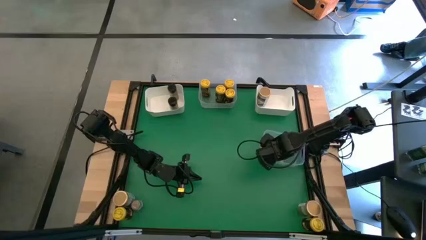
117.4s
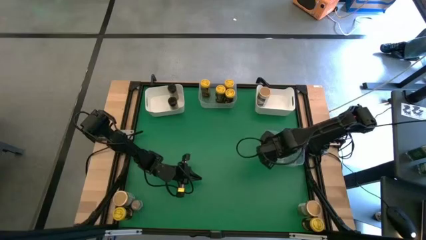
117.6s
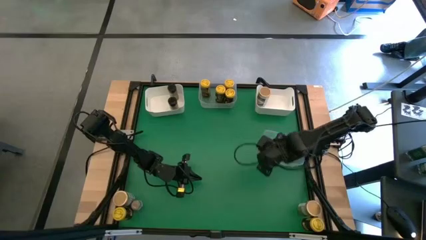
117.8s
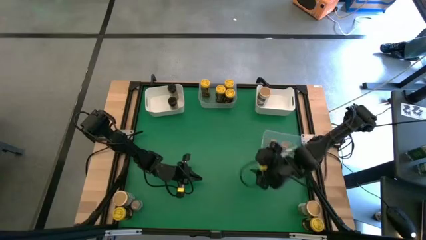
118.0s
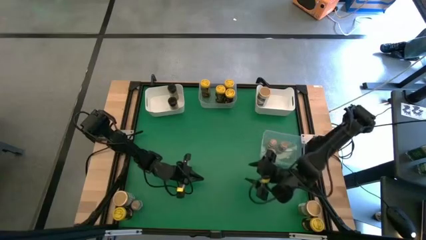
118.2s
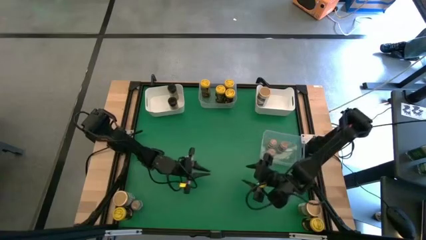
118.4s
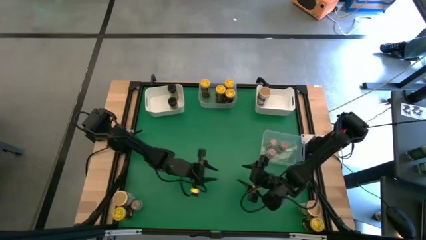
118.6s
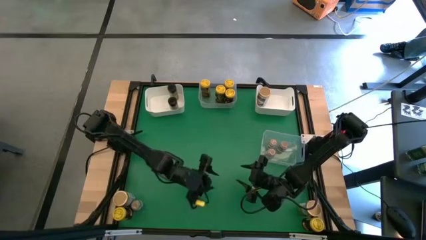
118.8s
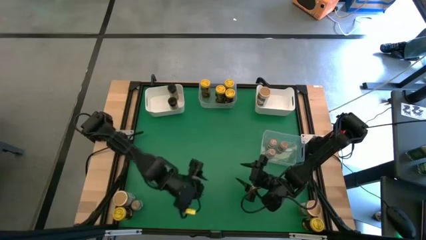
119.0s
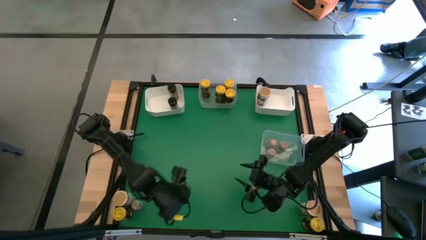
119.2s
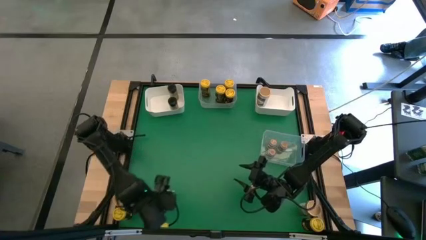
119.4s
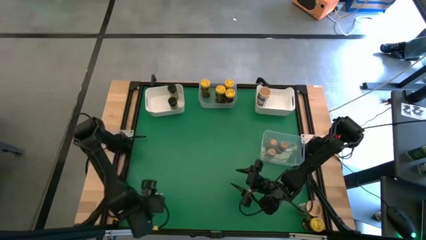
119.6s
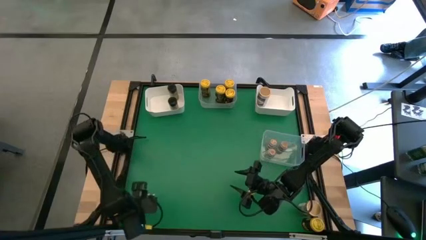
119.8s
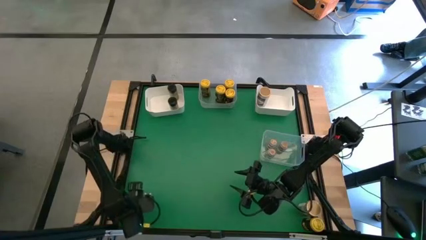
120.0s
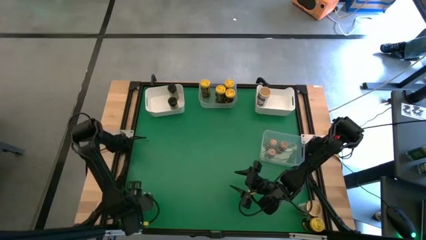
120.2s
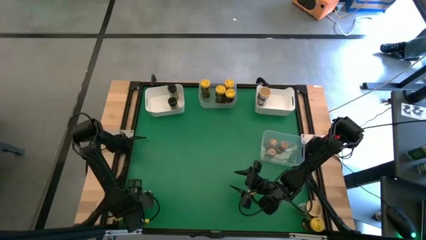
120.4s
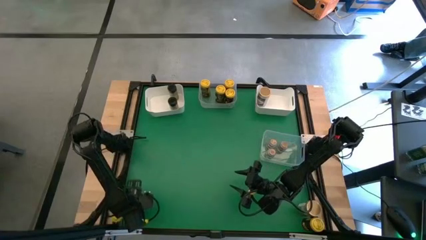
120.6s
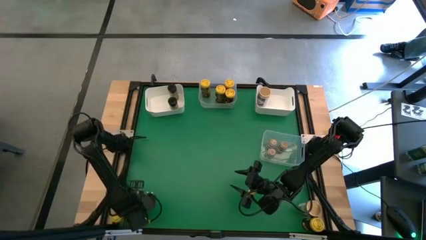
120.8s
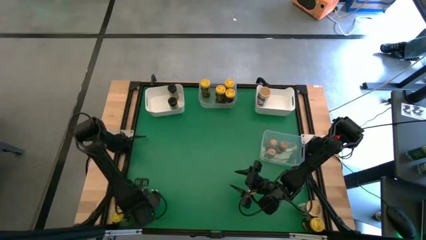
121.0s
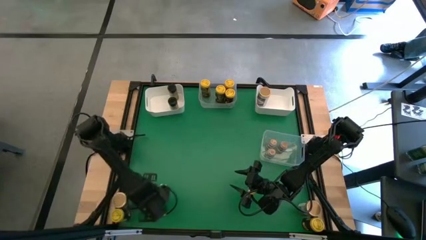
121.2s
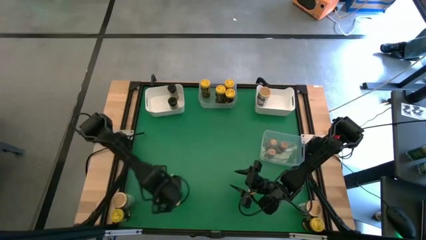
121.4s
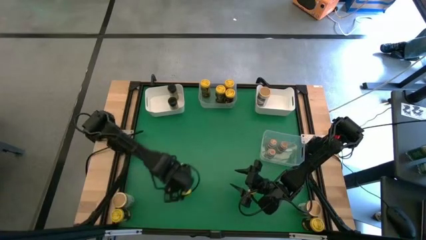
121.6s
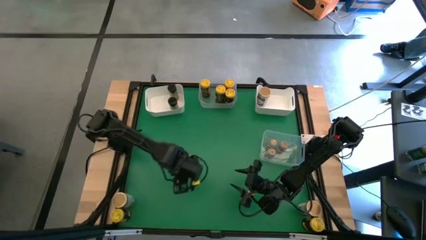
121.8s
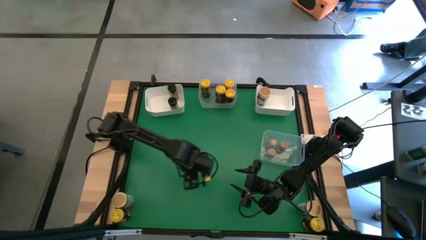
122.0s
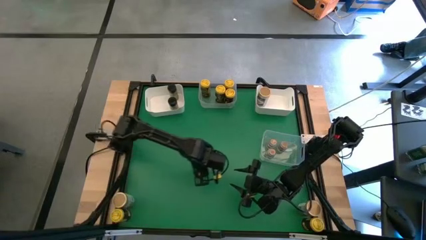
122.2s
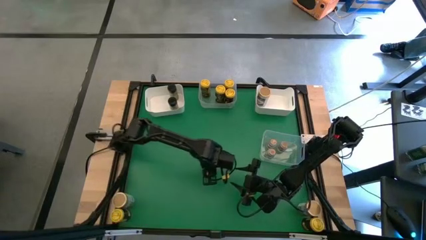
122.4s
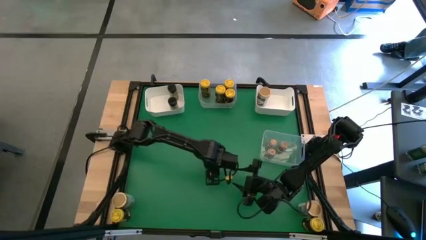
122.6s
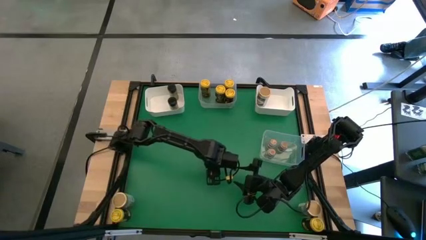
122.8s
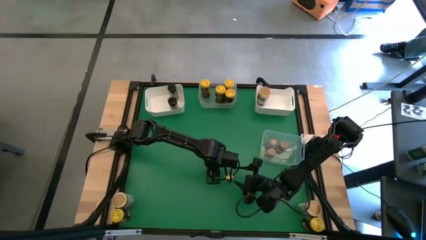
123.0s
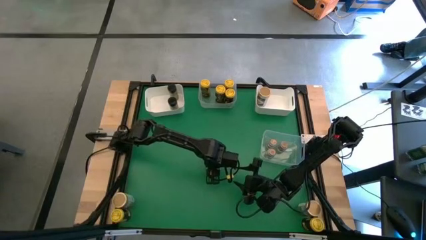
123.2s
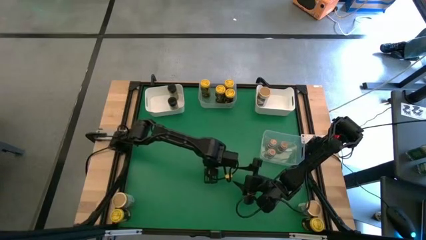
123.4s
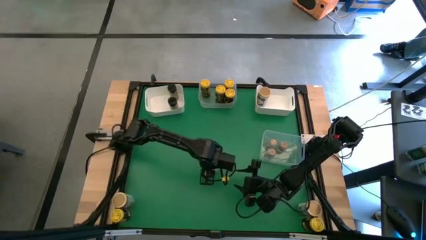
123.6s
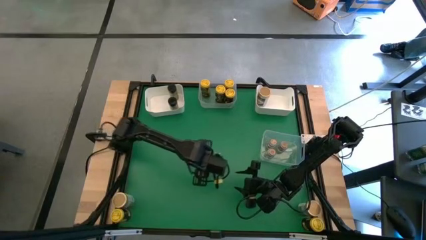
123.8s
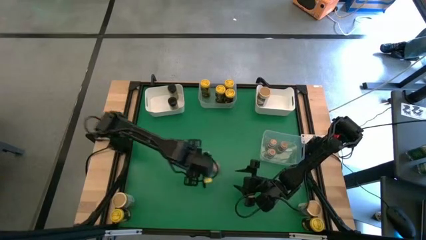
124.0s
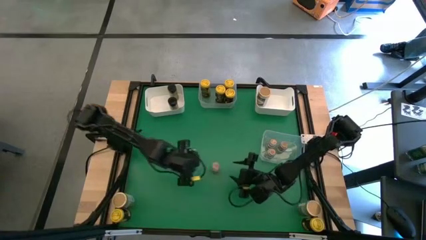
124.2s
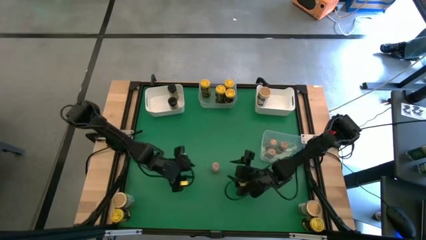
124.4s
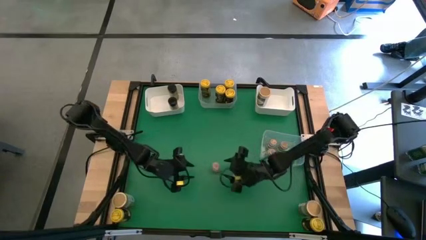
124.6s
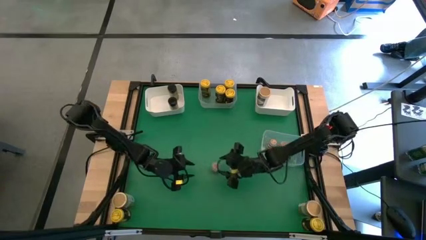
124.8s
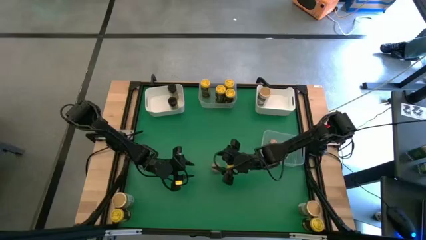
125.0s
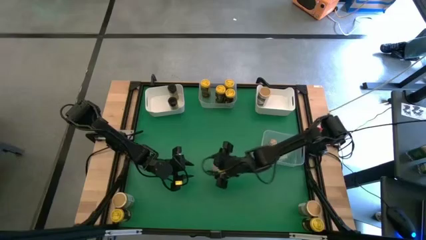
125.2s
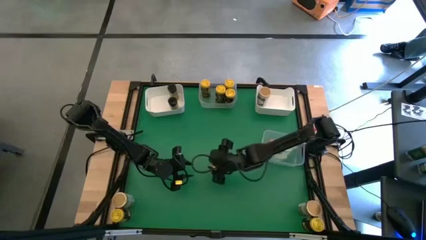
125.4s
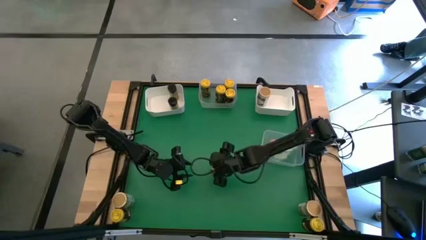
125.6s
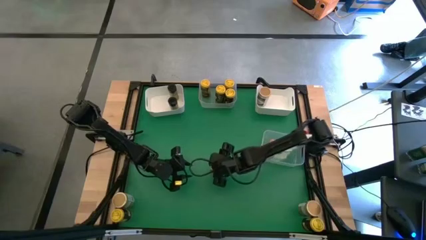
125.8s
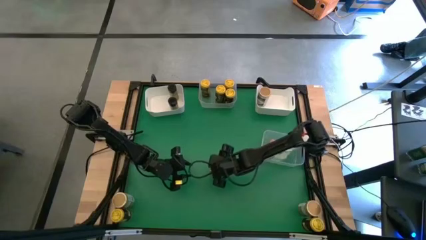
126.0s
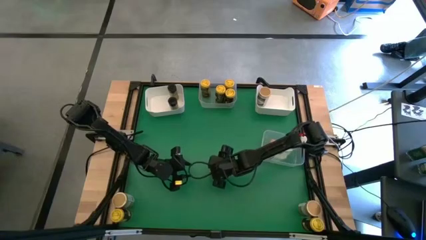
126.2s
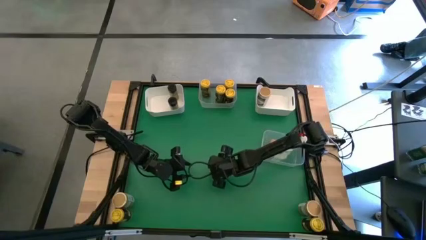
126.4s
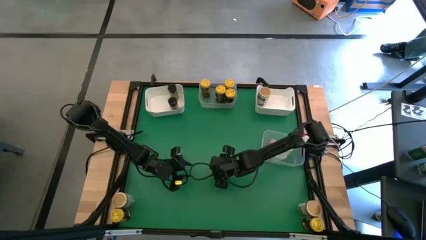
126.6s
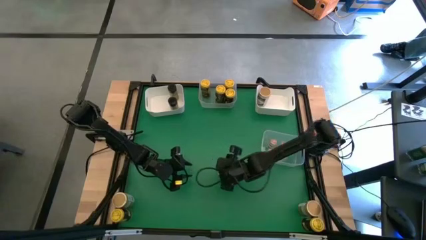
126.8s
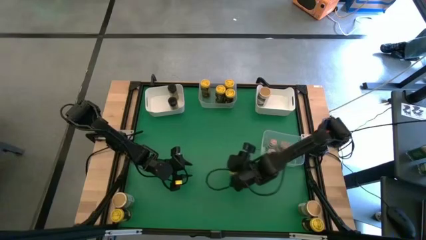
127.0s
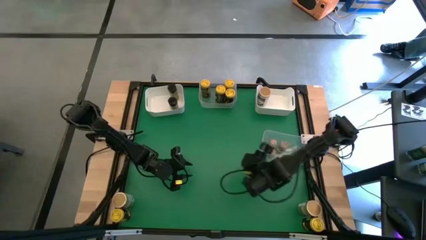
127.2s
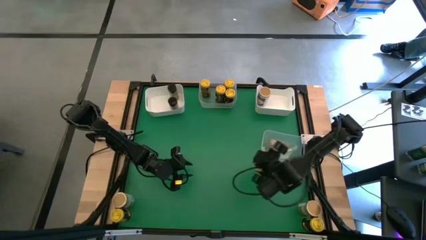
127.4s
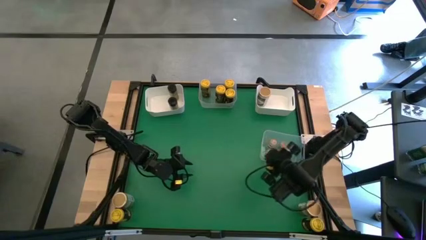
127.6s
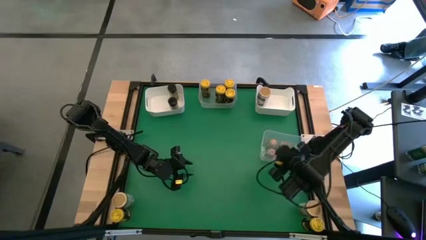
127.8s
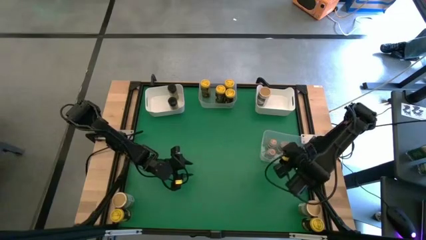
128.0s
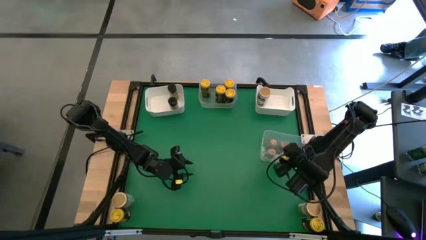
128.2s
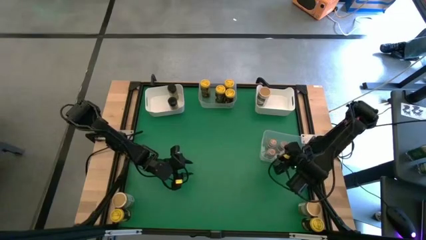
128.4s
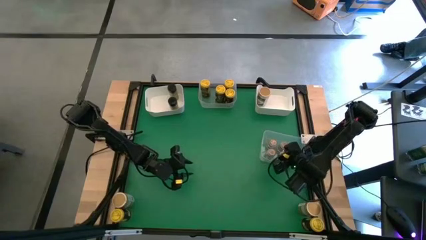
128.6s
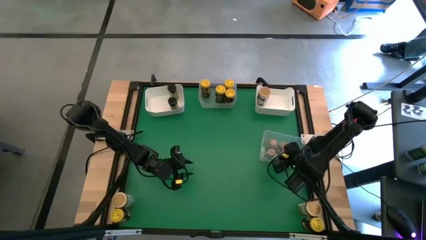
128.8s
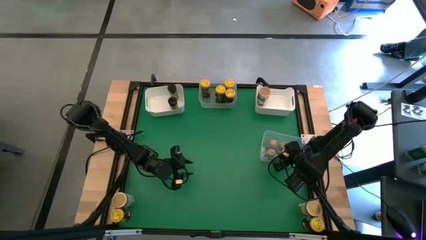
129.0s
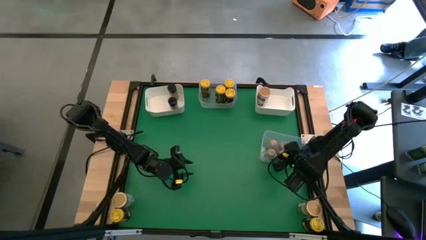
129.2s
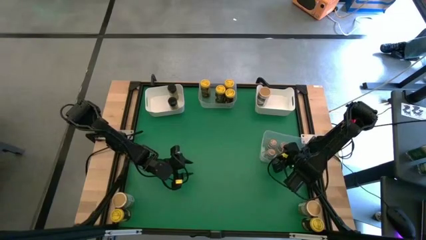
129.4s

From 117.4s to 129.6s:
Task: Sort spices by type
Put the transparent seasoning bottle into the bottom transparent bin
